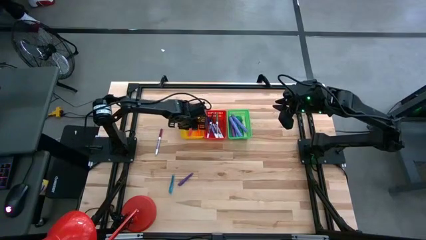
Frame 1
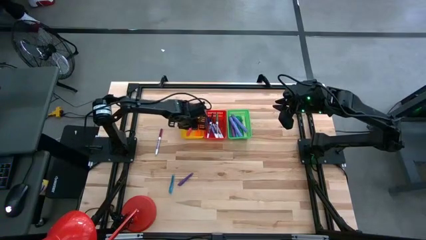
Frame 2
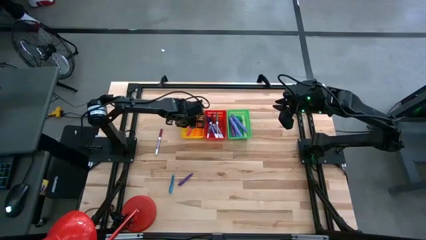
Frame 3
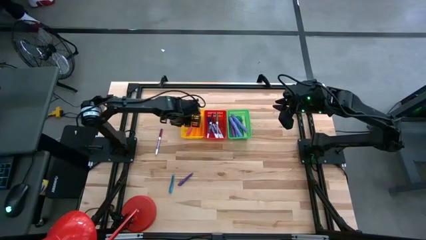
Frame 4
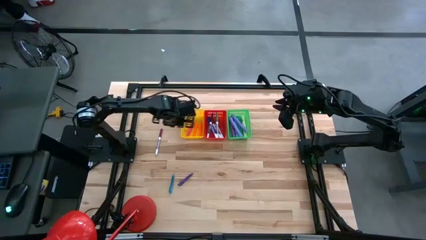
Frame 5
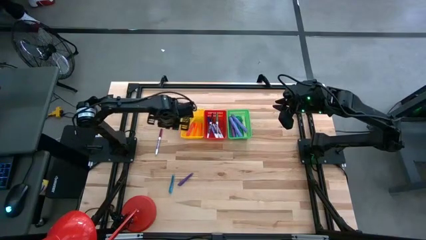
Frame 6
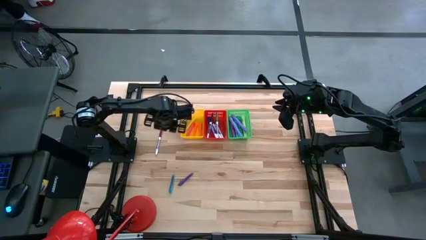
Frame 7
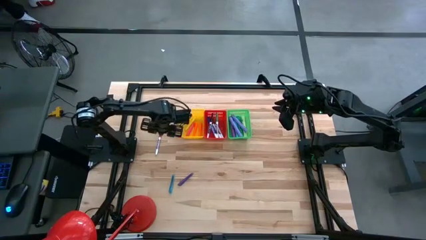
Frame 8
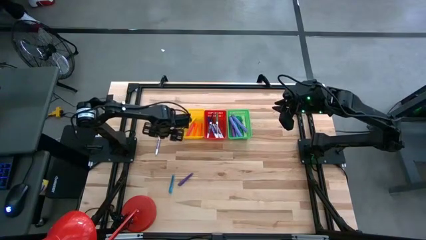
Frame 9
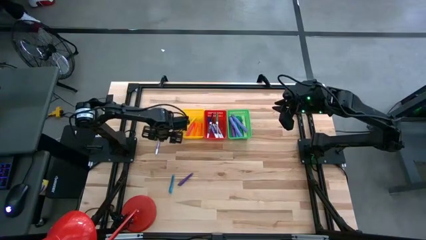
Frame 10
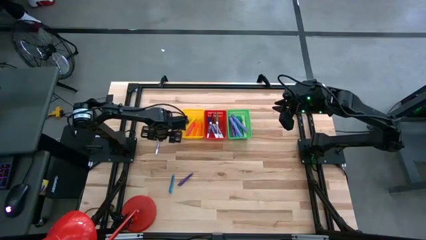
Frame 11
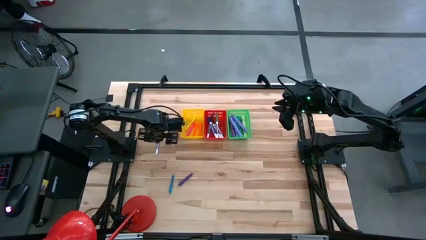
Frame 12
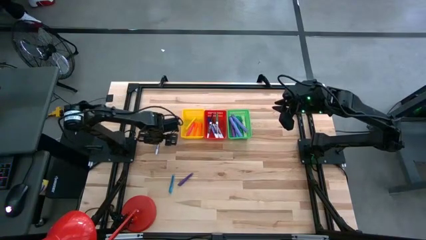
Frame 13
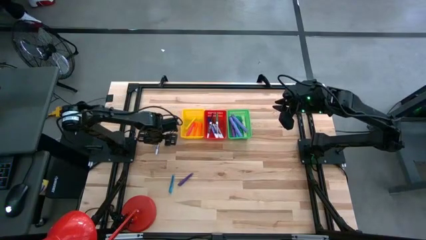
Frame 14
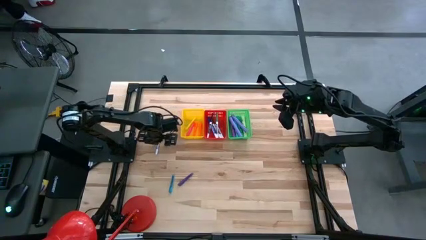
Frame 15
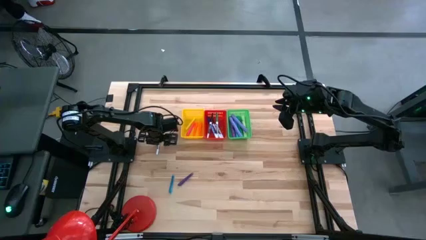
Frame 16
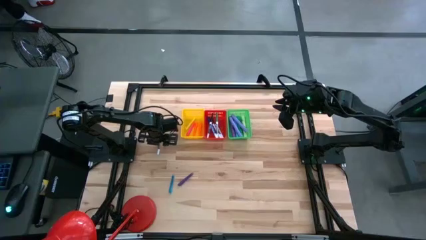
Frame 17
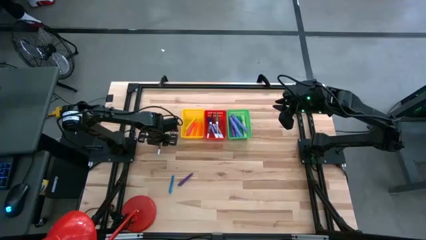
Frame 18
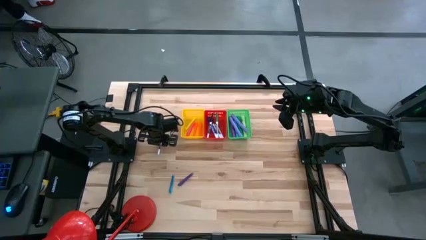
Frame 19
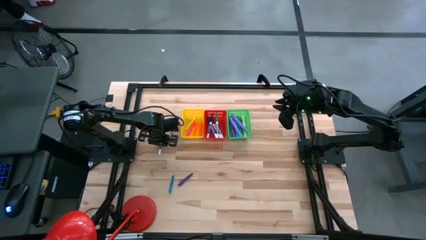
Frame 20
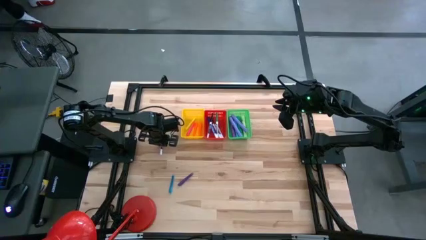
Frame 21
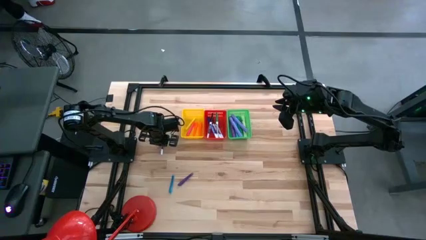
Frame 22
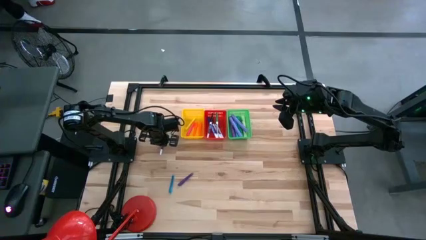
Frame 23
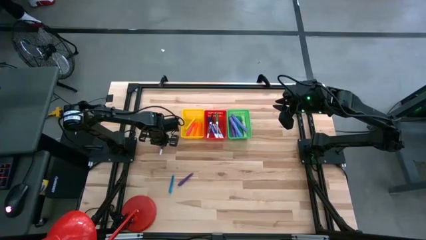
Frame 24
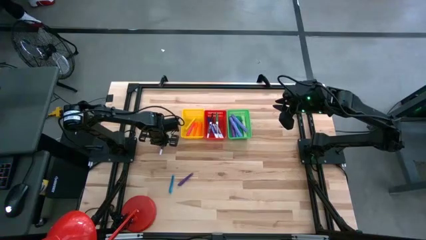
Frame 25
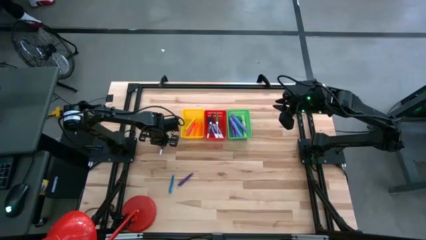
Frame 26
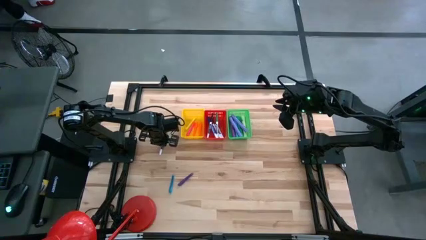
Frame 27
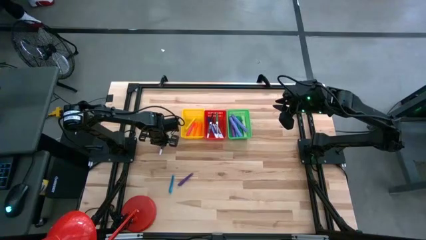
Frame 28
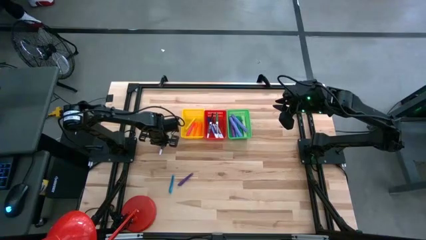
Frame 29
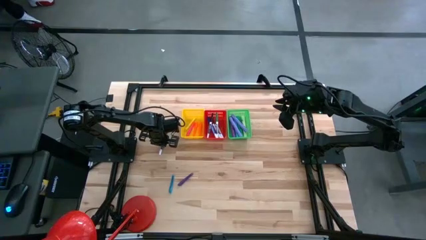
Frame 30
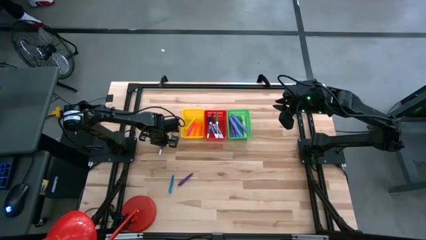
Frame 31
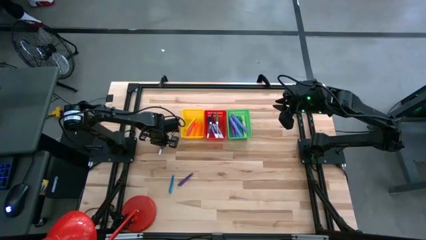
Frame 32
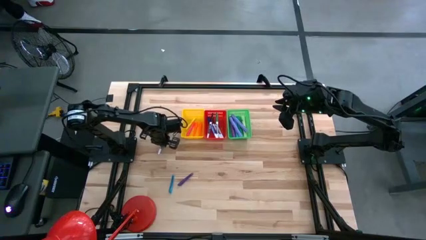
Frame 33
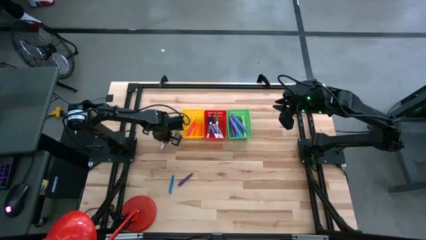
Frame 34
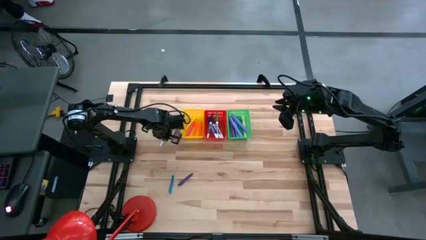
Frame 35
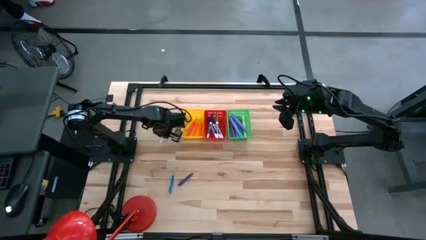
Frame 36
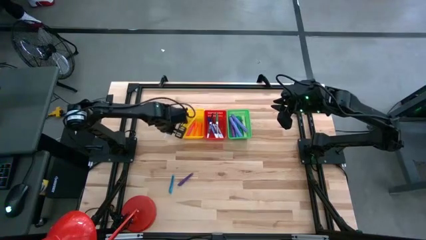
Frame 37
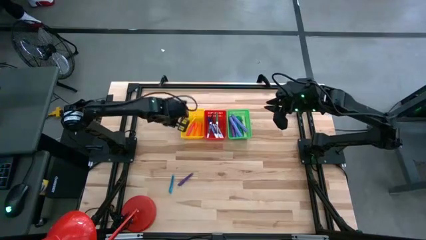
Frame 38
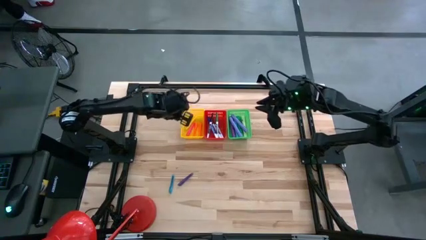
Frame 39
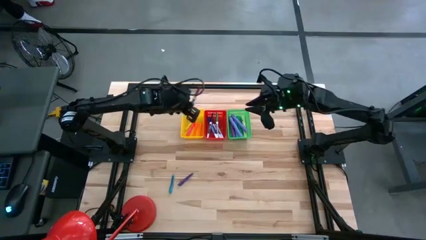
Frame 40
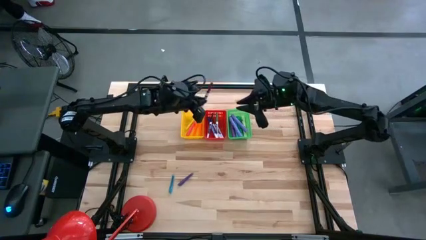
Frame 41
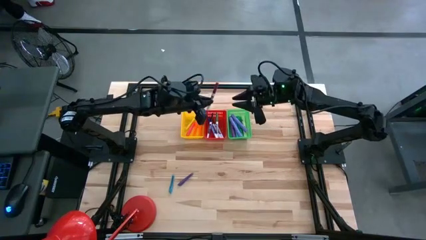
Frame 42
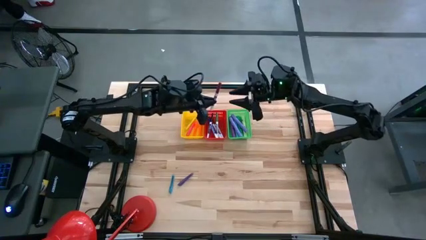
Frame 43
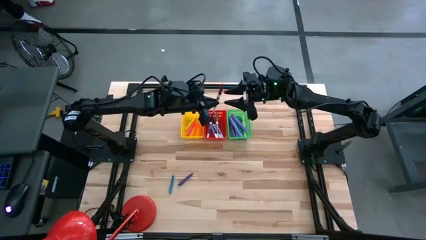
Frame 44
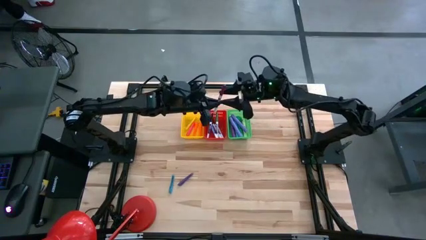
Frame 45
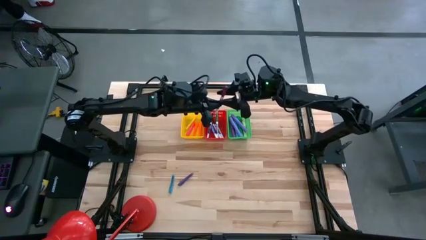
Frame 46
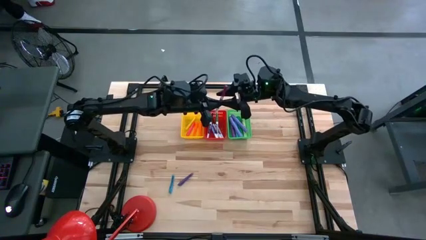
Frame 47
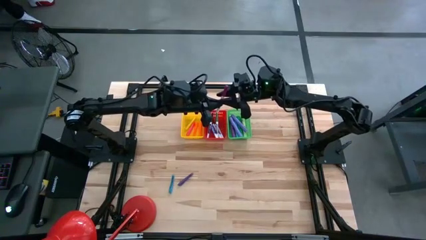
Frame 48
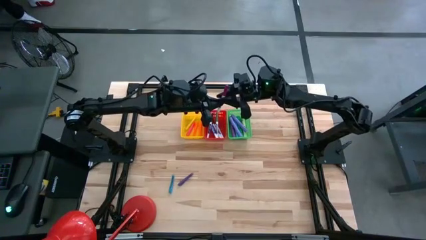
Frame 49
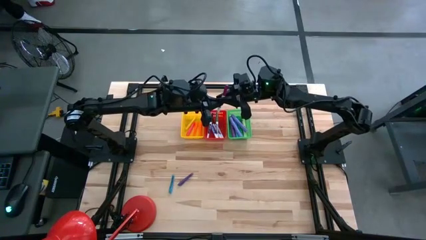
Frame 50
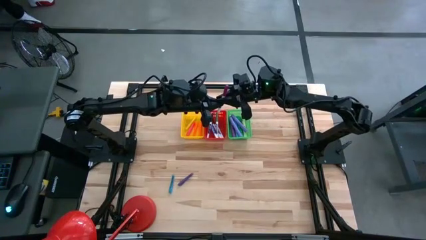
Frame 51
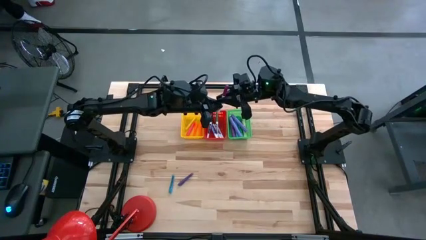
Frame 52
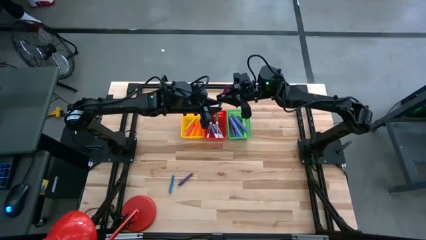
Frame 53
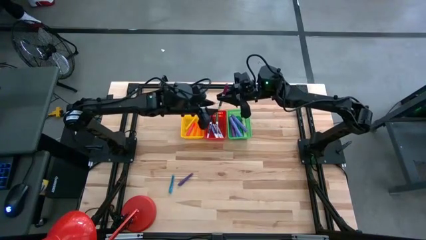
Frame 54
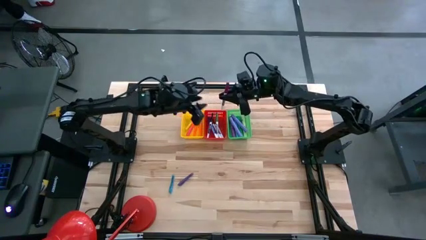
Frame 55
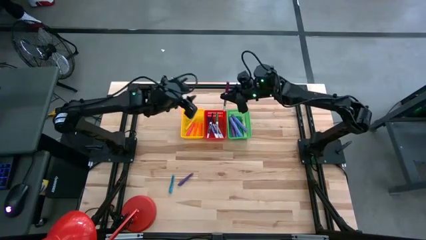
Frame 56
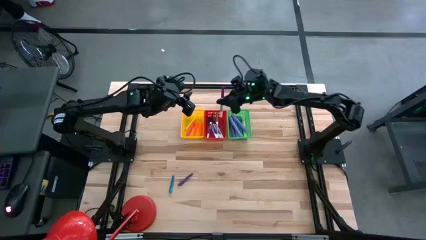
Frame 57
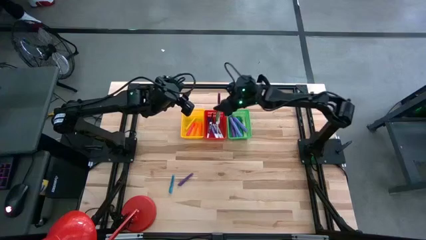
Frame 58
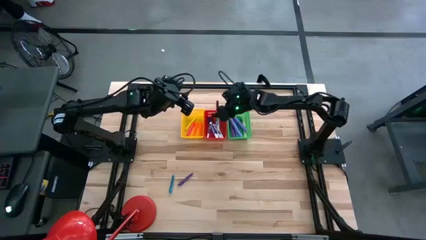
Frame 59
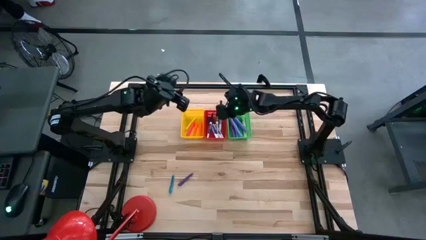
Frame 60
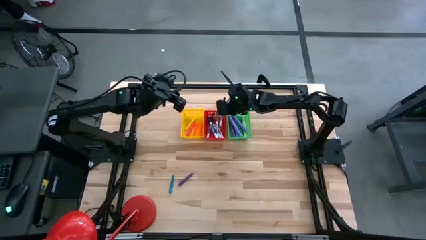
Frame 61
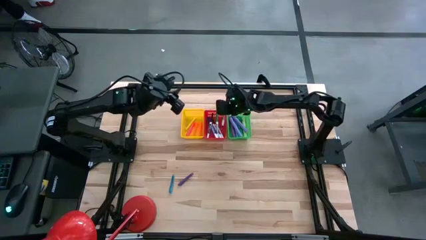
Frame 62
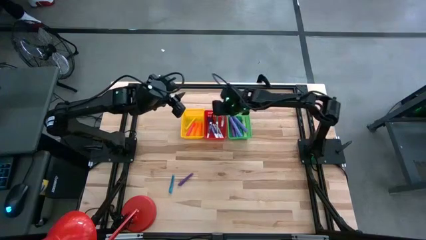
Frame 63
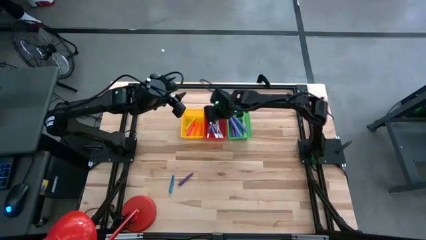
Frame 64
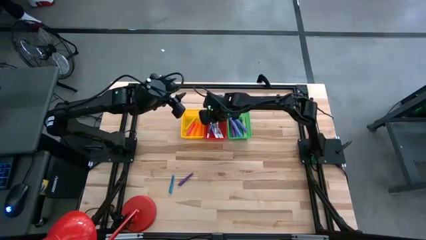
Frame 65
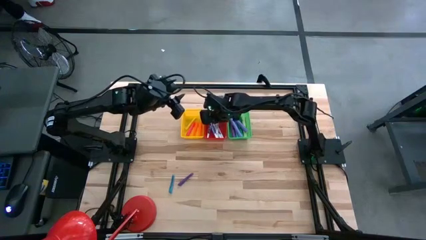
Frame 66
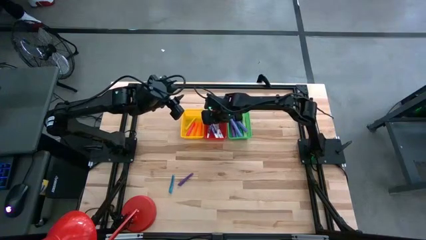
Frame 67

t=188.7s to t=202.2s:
Task: Pick & Place Markers
Put the purple marker into the red bin
